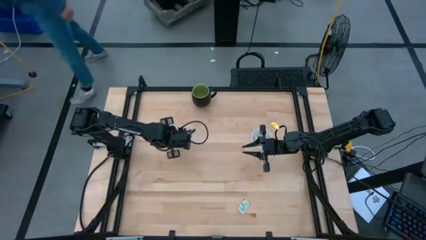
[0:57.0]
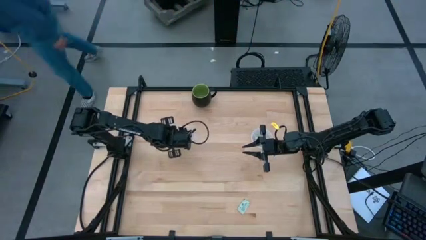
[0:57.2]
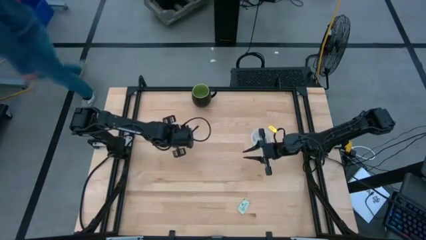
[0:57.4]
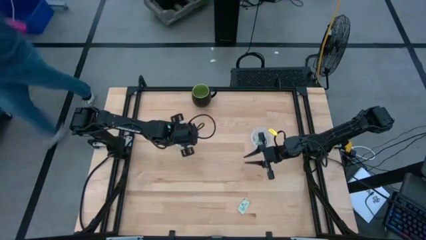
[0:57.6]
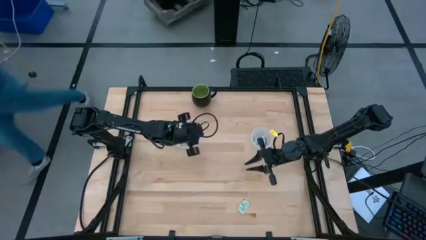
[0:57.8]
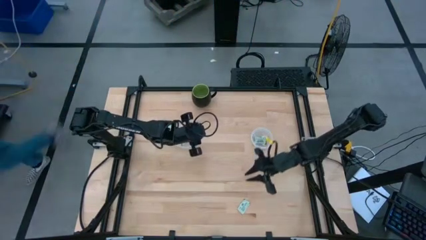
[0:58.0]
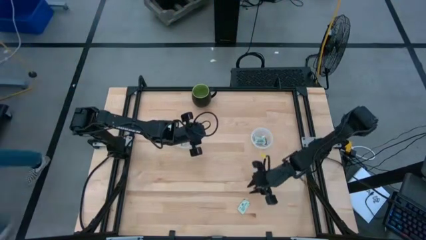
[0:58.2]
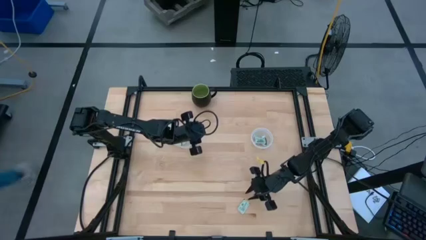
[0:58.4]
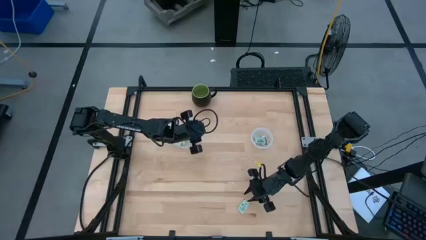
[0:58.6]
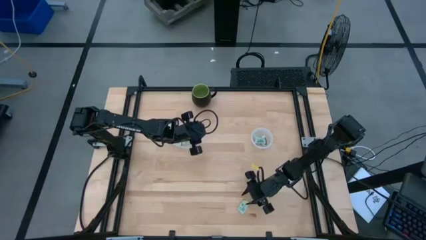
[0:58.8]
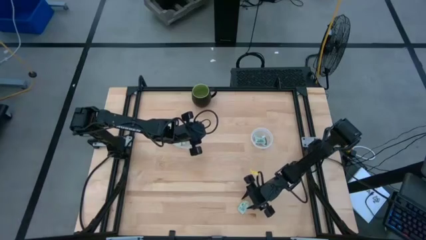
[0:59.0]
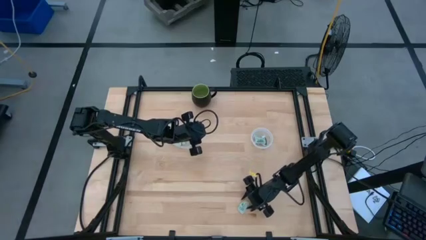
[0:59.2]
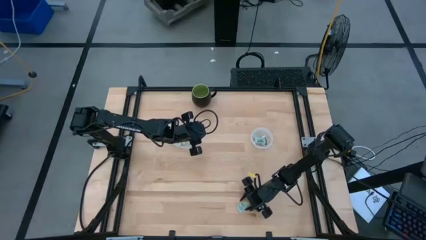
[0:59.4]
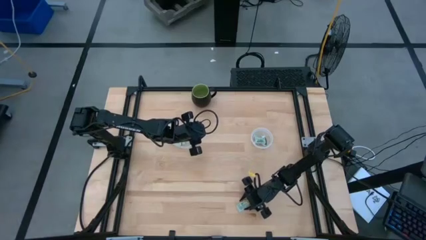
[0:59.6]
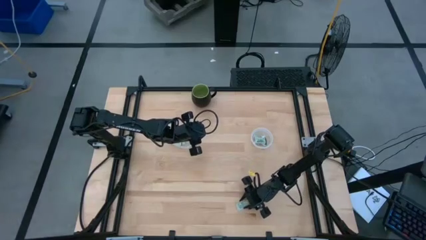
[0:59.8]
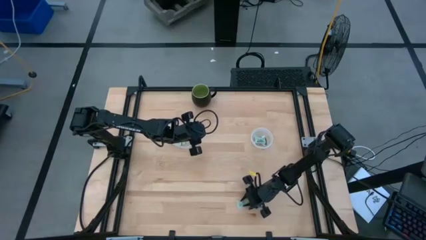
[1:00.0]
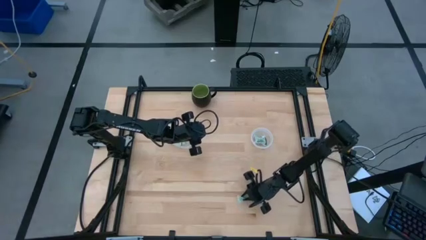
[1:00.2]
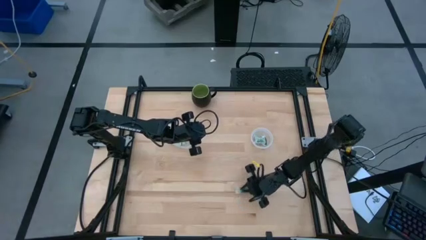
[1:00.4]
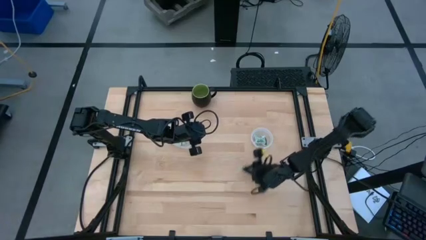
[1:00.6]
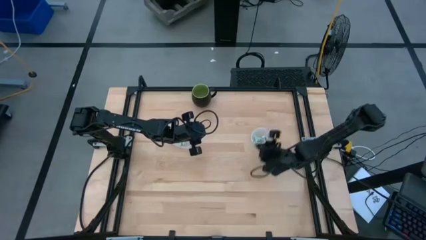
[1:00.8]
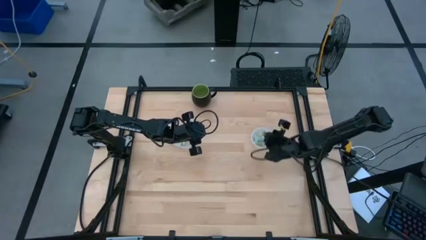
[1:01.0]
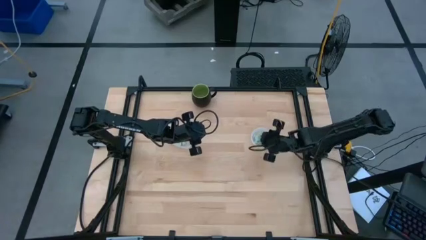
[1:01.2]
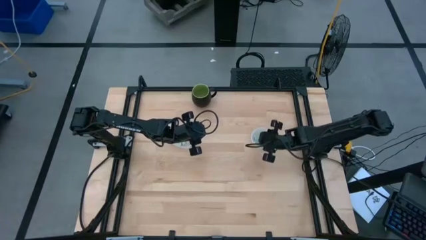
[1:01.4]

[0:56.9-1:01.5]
Task: Pick and place Stevia / Truvia into bins
Put the white stevia packet into the right transparent container

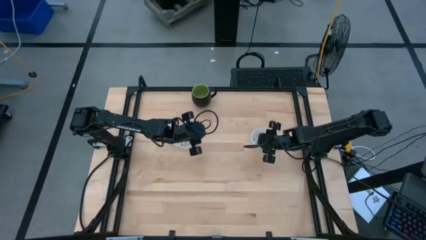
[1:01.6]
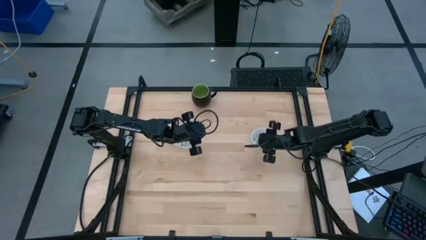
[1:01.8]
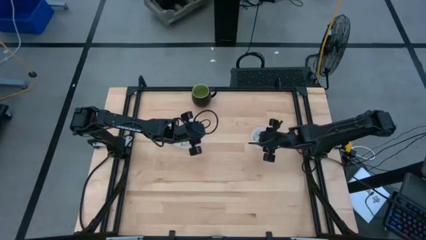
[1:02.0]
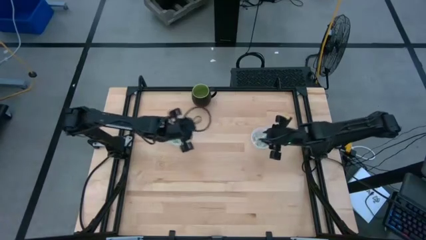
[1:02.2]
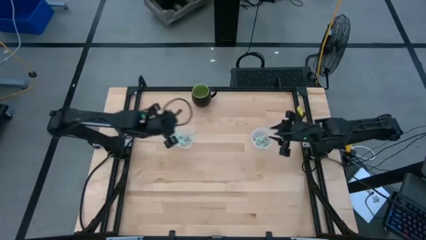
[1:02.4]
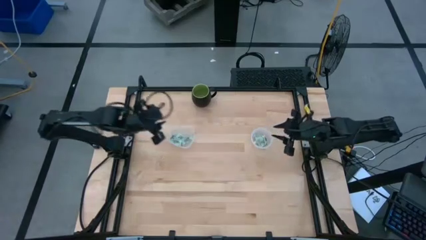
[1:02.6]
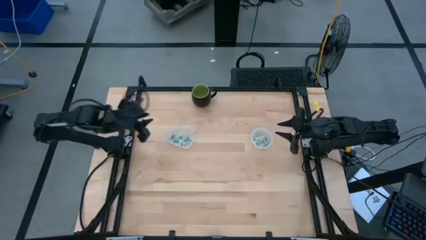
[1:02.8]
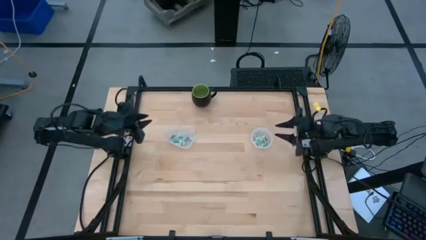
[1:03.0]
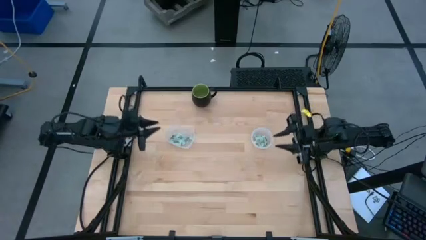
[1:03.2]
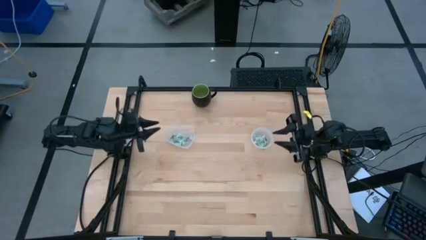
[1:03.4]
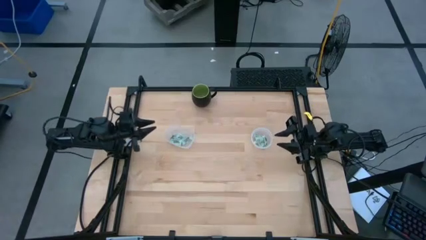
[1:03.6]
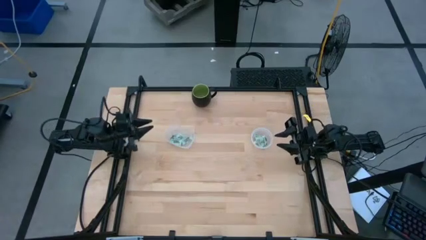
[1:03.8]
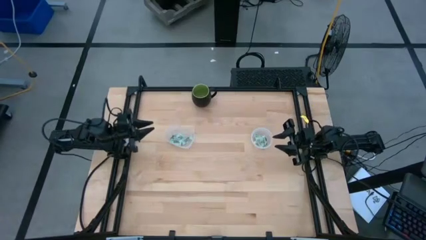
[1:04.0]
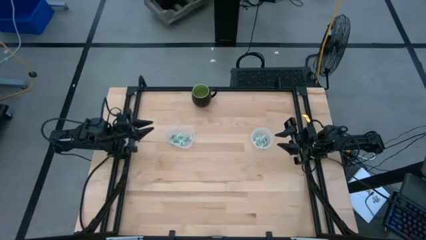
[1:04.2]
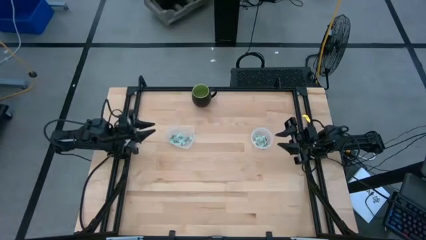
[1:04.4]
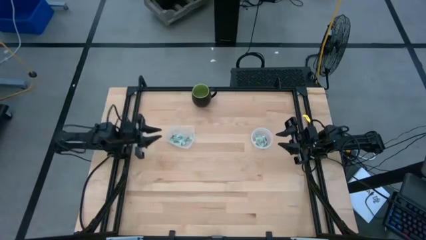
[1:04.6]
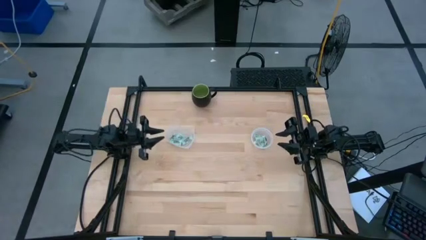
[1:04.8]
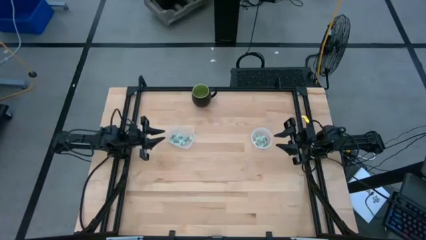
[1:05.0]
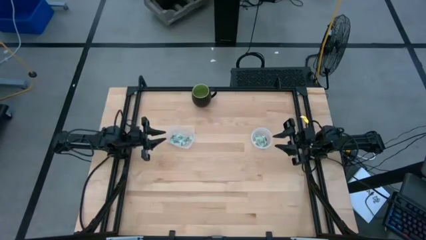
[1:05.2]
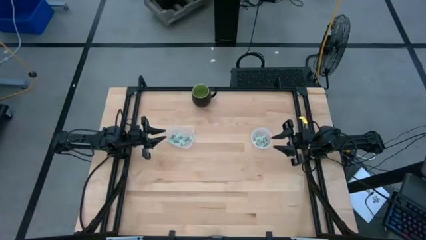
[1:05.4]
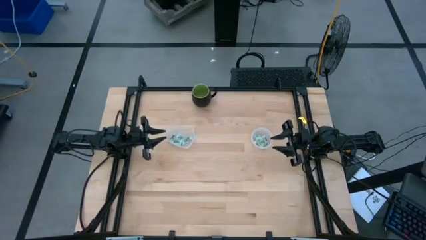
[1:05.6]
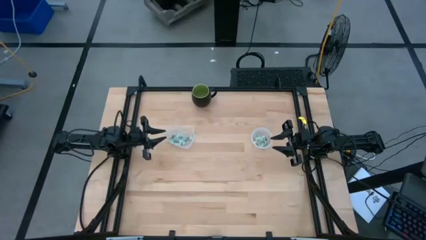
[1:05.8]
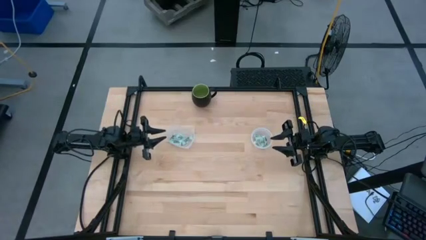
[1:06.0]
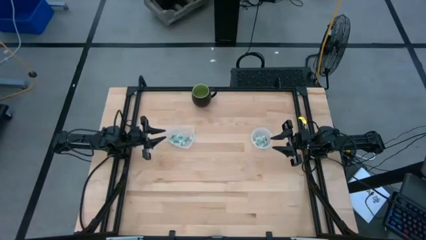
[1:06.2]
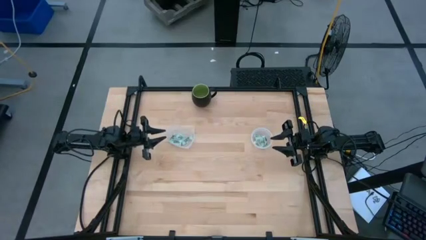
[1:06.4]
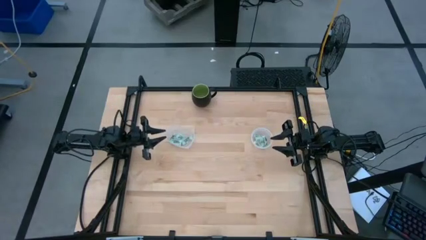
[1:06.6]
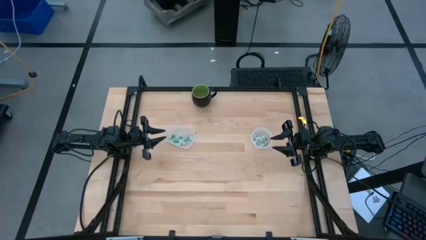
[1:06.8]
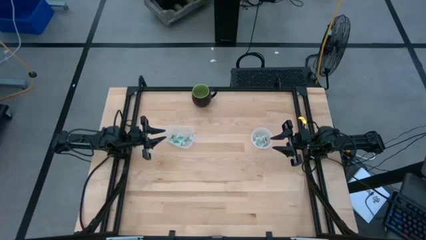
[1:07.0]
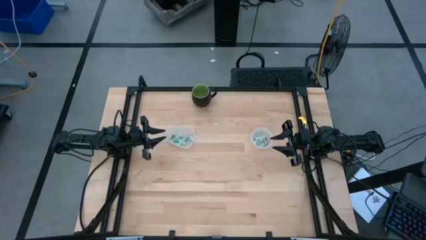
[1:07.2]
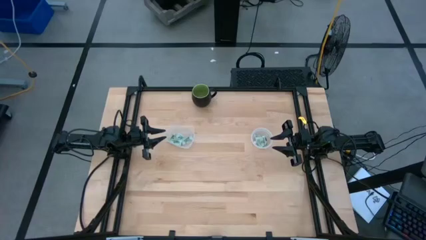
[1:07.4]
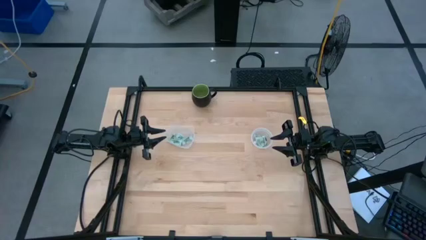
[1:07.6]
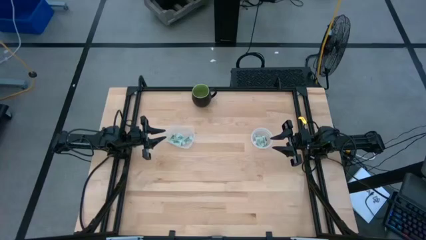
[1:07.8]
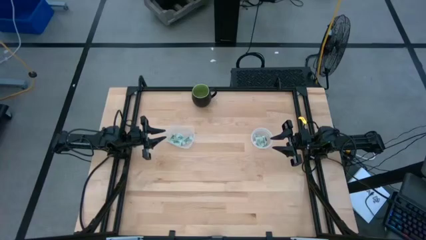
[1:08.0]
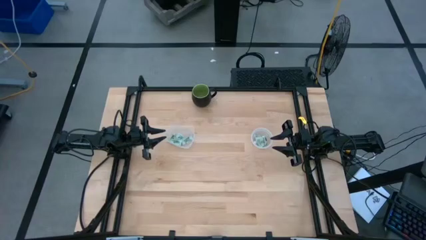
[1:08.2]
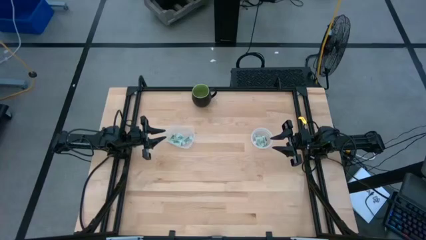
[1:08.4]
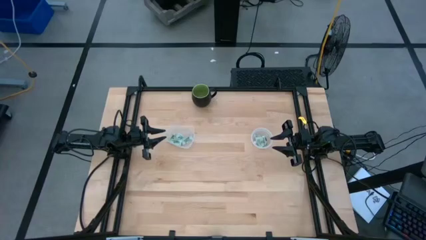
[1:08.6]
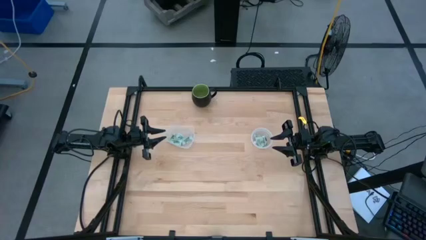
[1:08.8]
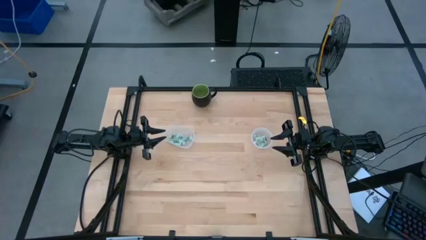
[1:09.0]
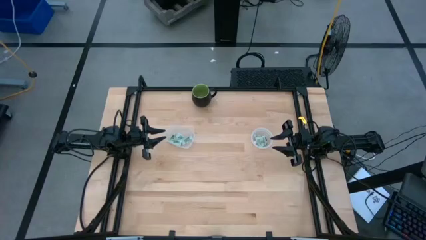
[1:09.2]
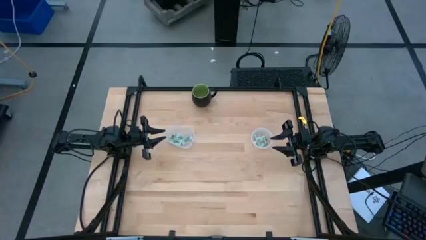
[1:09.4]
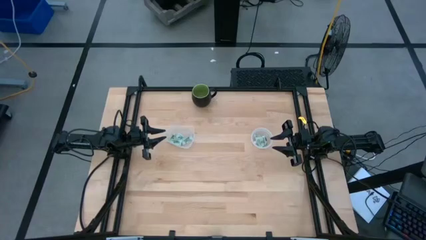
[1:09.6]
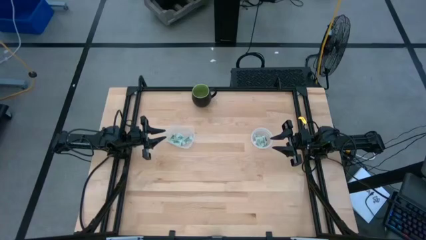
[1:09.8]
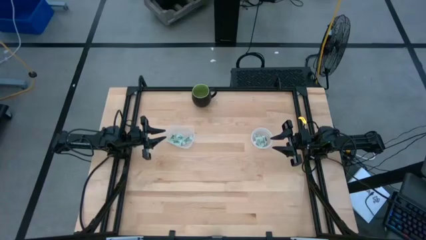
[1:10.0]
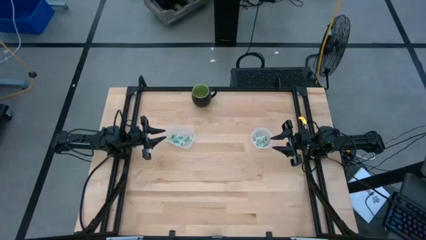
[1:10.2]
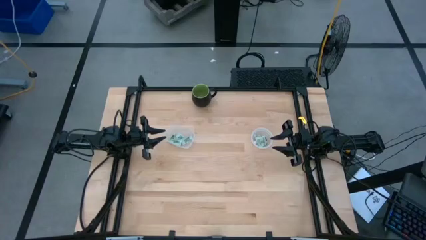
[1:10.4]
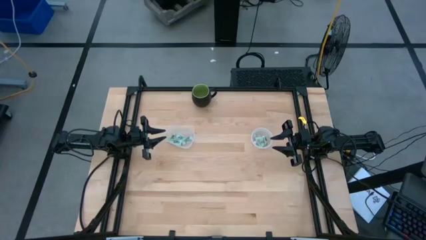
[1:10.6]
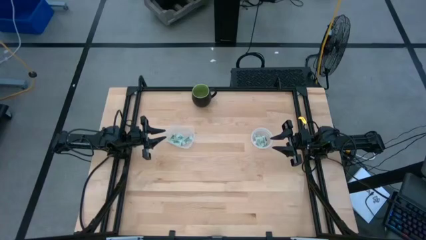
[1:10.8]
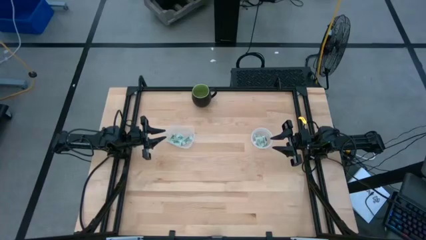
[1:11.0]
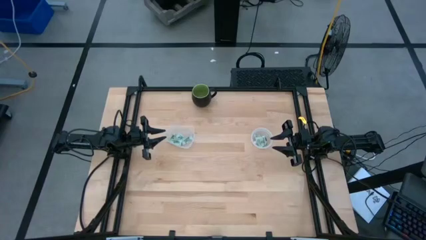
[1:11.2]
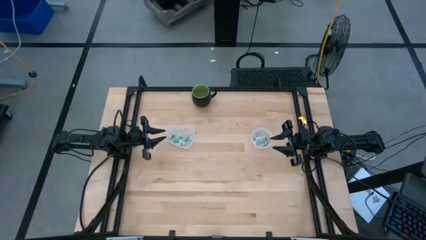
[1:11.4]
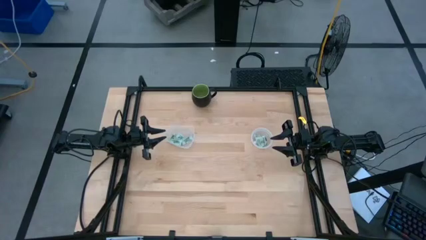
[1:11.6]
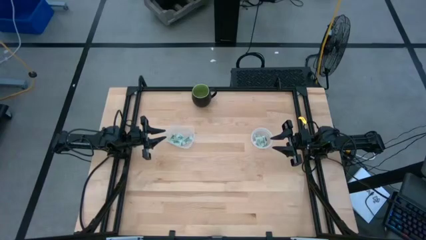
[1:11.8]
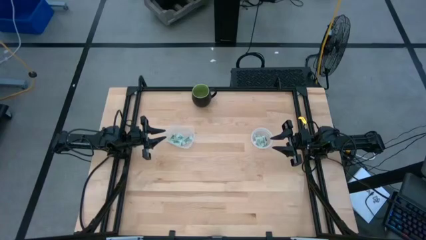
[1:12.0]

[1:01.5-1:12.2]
Return to Home Position

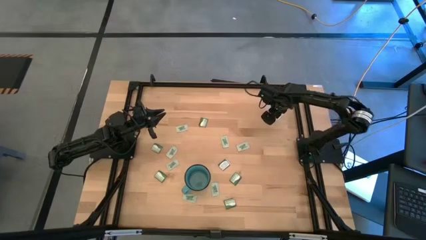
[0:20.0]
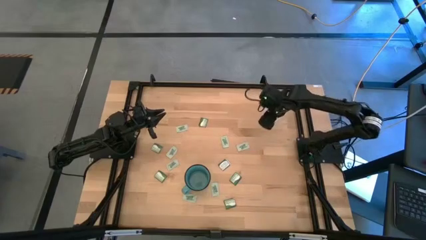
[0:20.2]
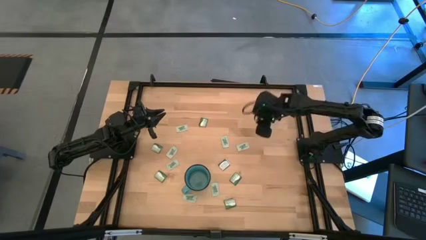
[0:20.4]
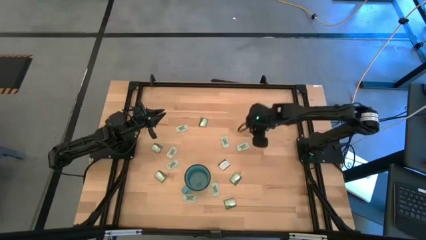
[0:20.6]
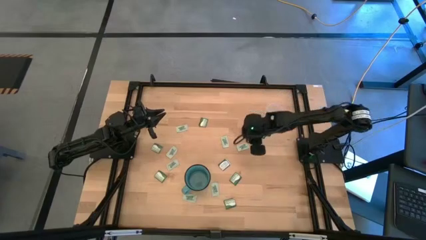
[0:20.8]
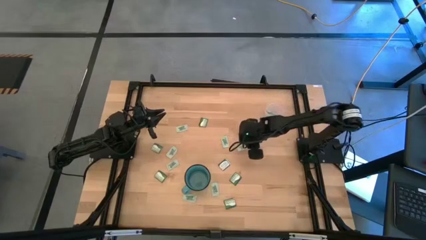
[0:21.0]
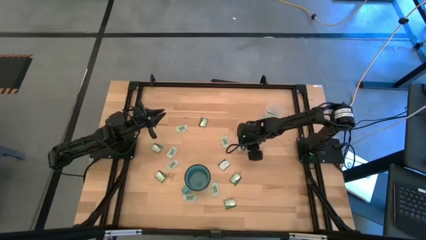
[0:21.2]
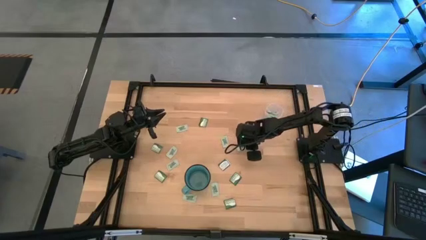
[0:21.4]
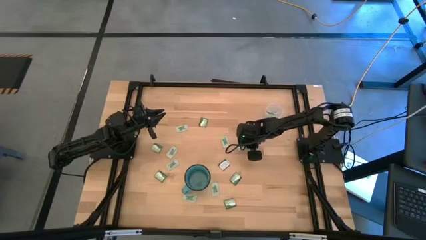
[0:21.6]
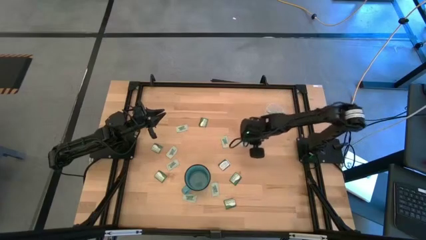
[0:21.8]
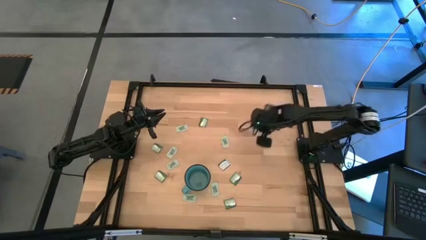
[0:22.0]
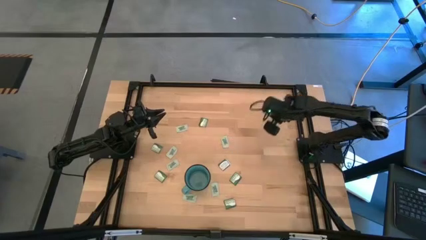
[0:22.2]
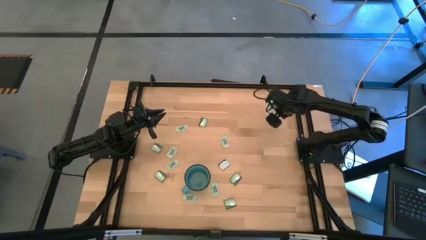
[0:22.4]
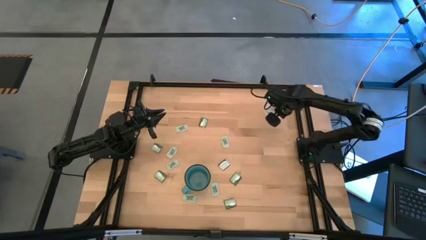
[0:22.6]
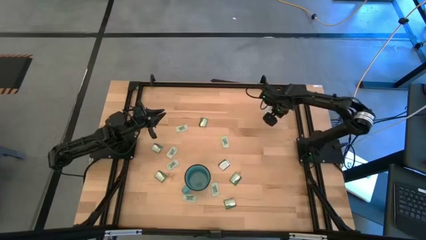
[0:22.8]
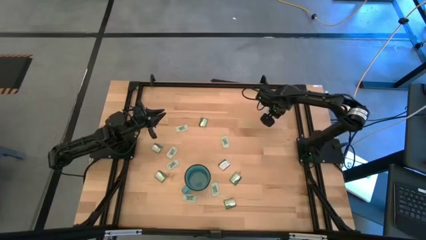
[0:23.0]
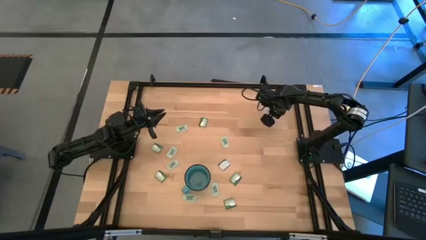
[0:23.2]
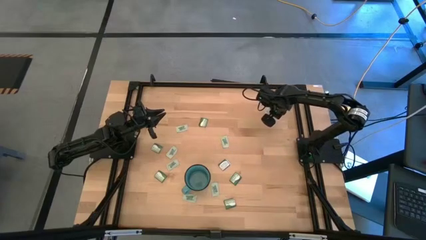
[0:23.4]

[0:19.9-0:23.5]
Task: Pick and place items into bin
Put the stevia packet into the transparent bin
